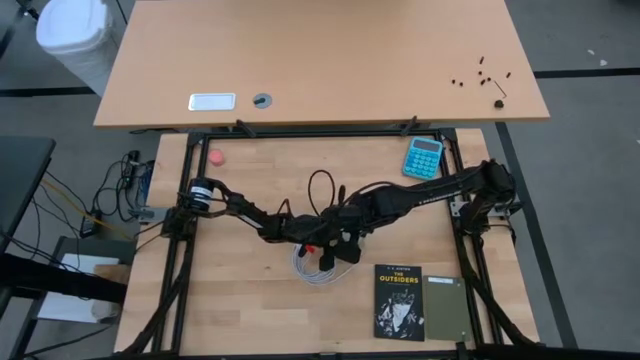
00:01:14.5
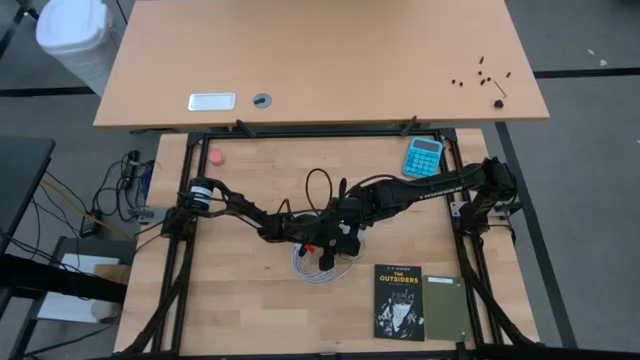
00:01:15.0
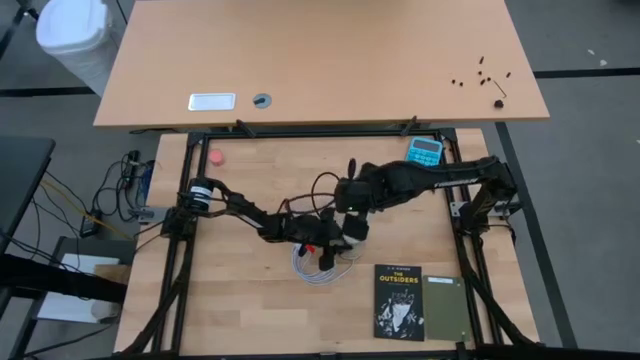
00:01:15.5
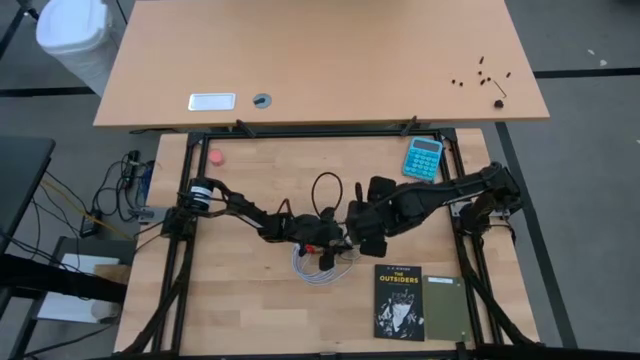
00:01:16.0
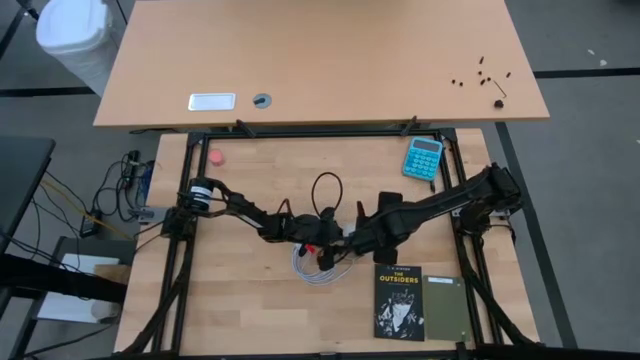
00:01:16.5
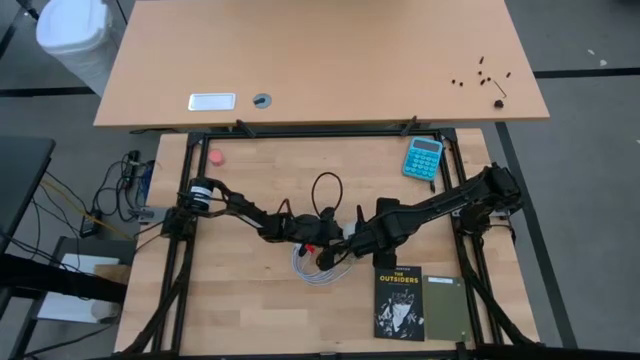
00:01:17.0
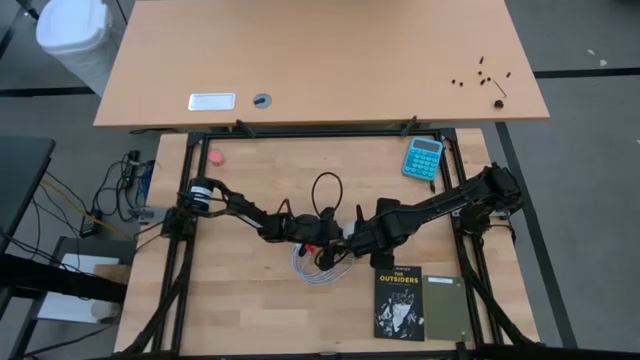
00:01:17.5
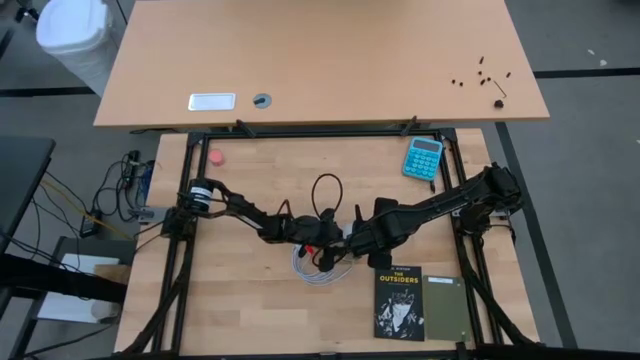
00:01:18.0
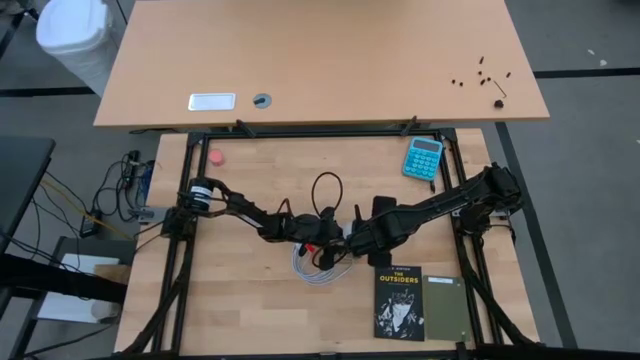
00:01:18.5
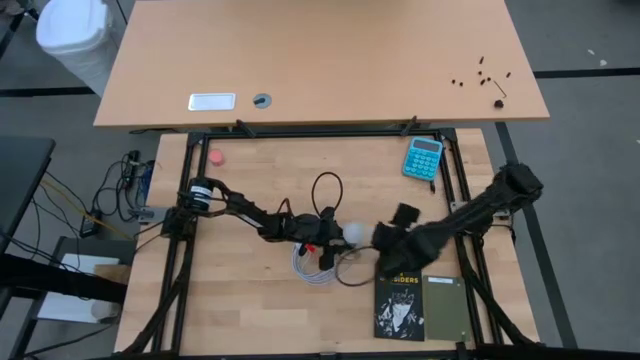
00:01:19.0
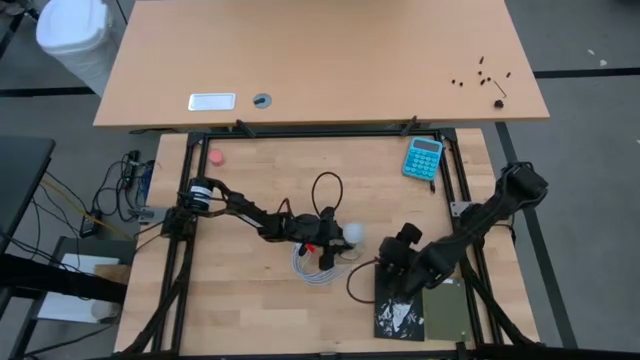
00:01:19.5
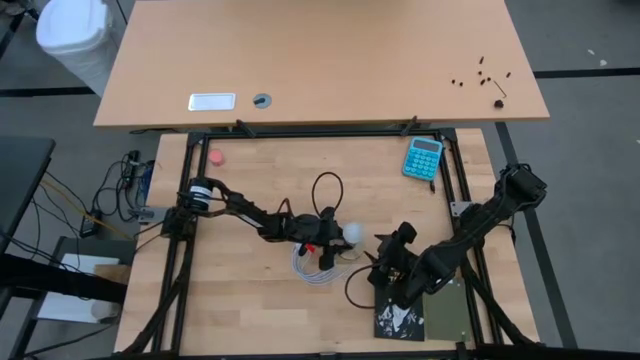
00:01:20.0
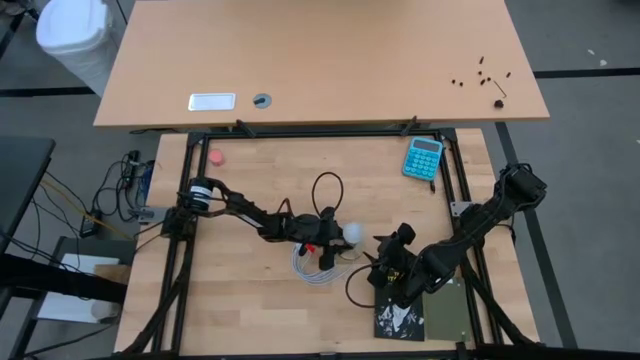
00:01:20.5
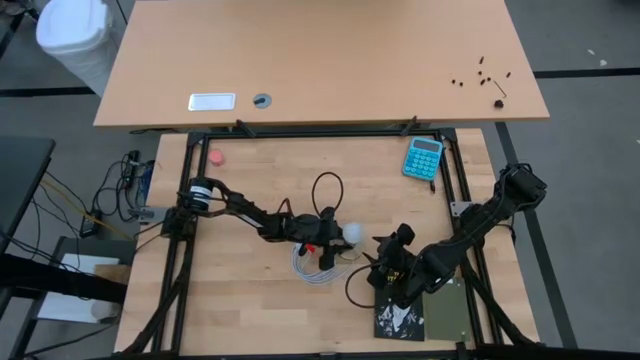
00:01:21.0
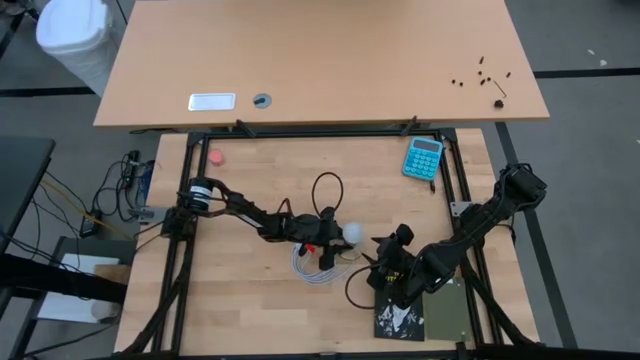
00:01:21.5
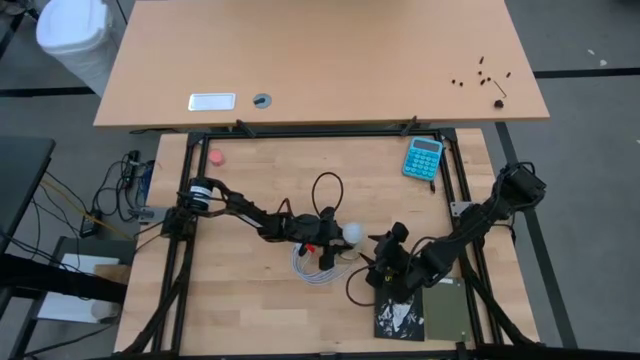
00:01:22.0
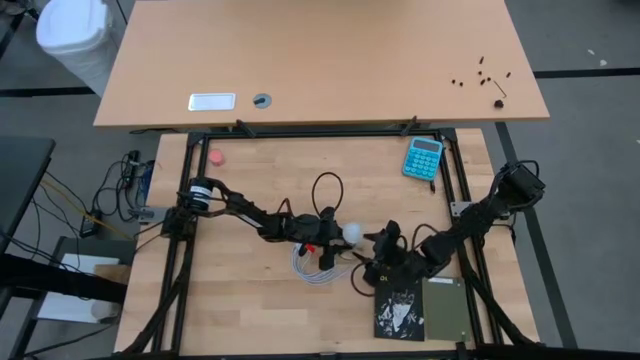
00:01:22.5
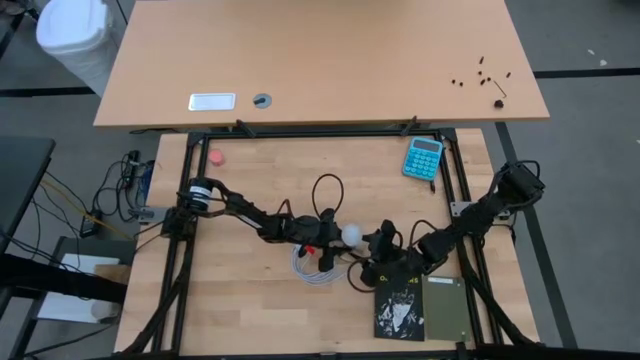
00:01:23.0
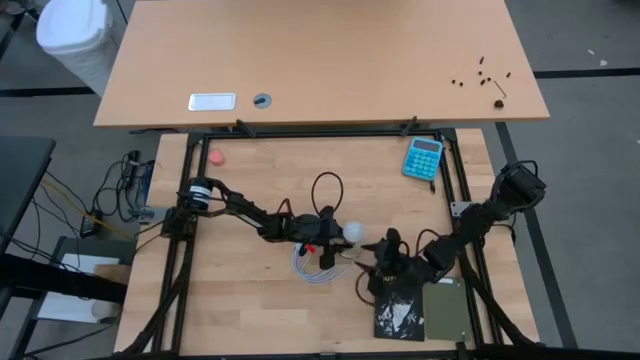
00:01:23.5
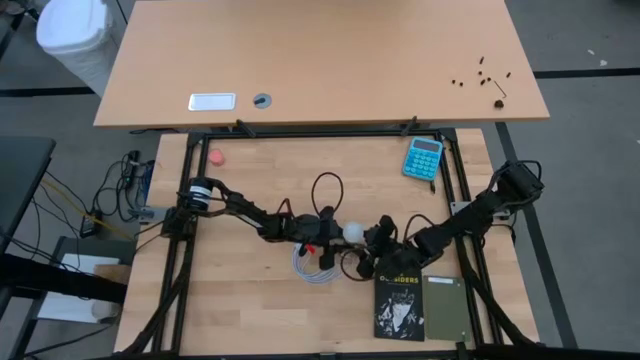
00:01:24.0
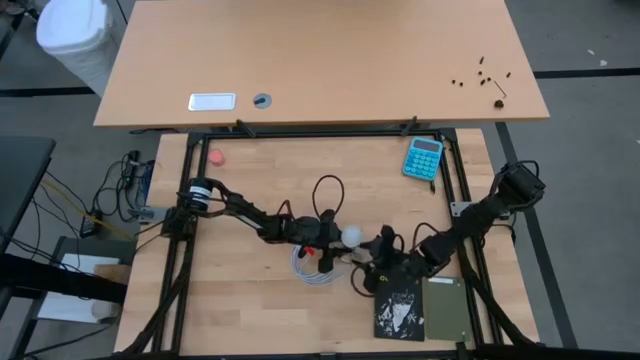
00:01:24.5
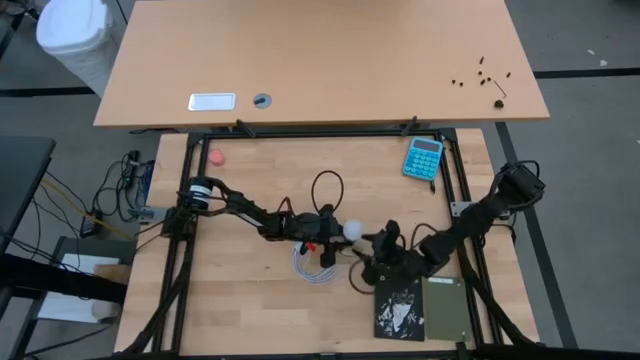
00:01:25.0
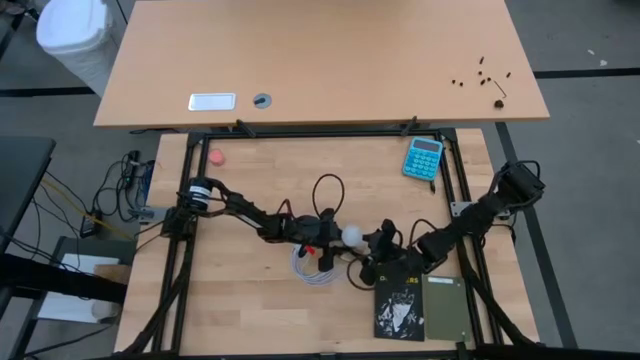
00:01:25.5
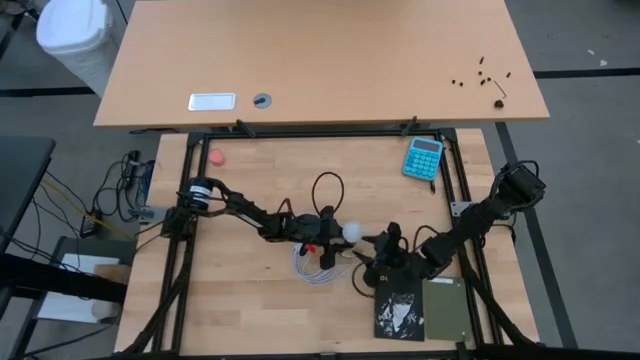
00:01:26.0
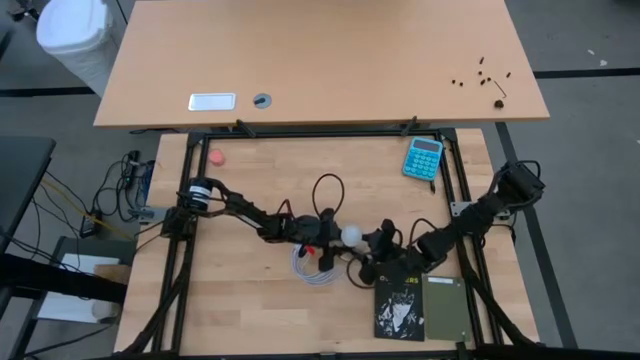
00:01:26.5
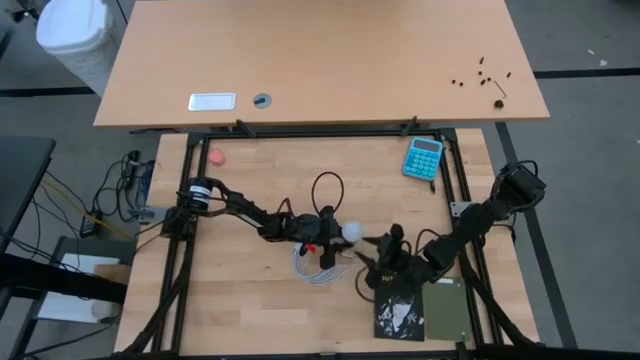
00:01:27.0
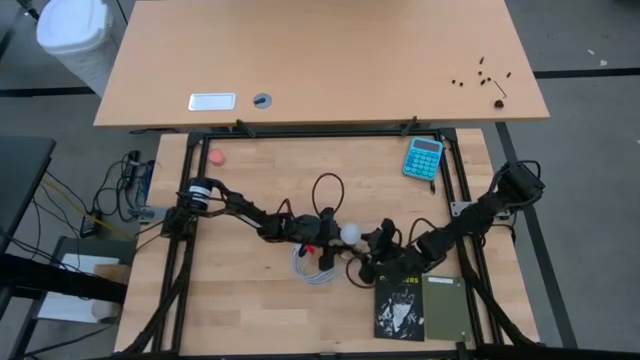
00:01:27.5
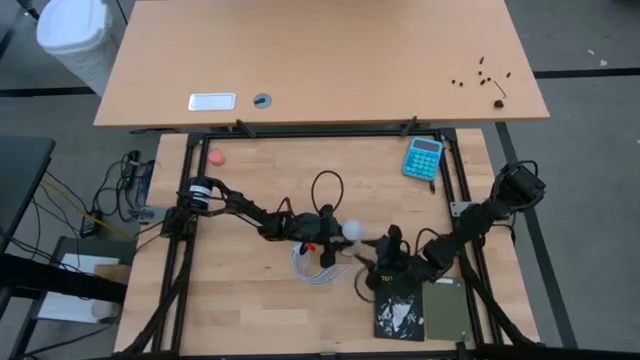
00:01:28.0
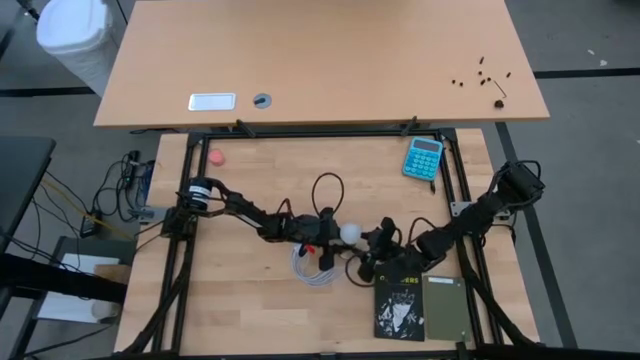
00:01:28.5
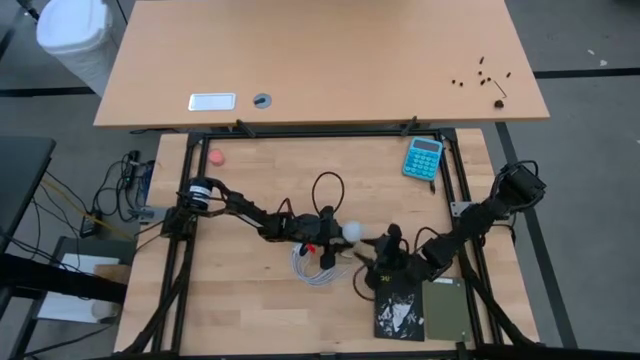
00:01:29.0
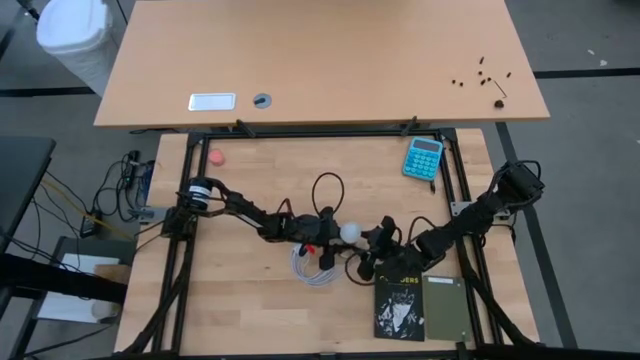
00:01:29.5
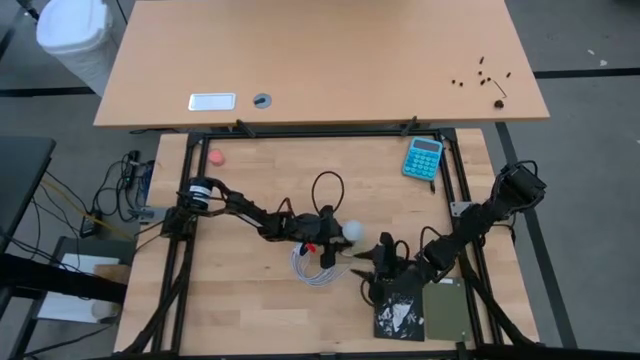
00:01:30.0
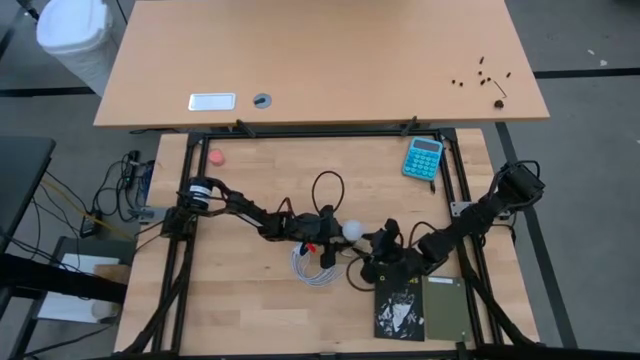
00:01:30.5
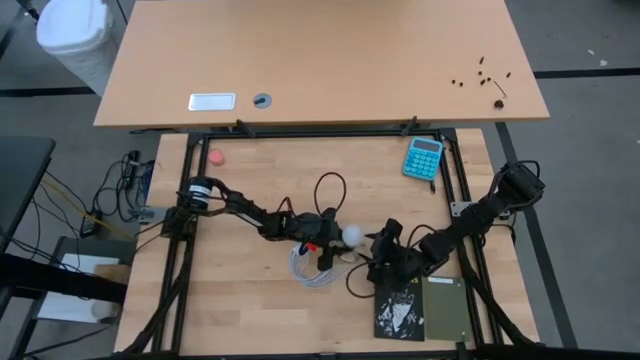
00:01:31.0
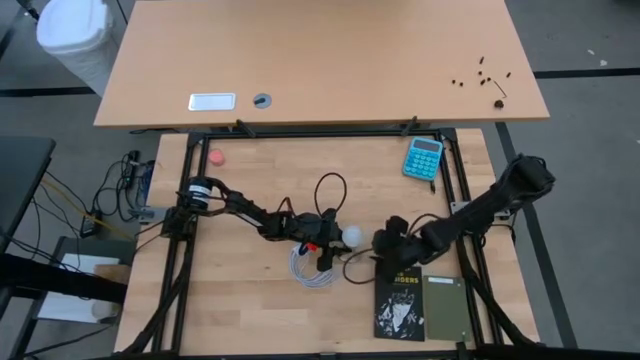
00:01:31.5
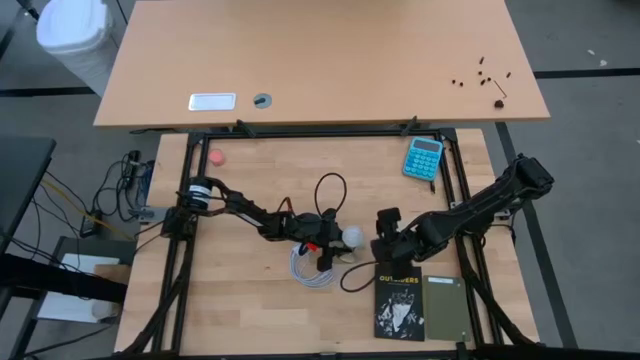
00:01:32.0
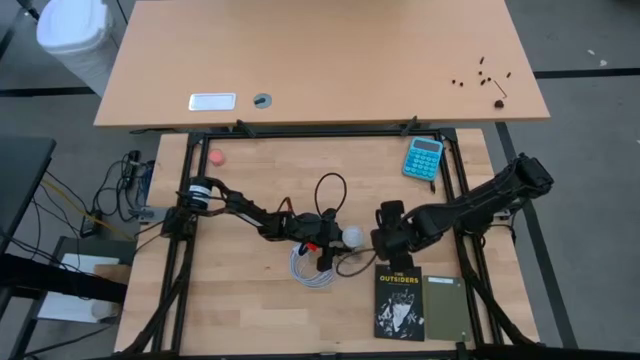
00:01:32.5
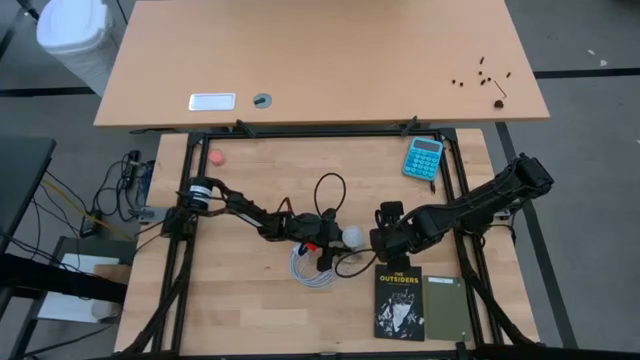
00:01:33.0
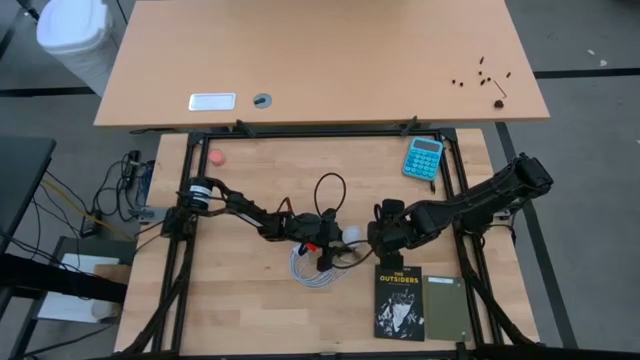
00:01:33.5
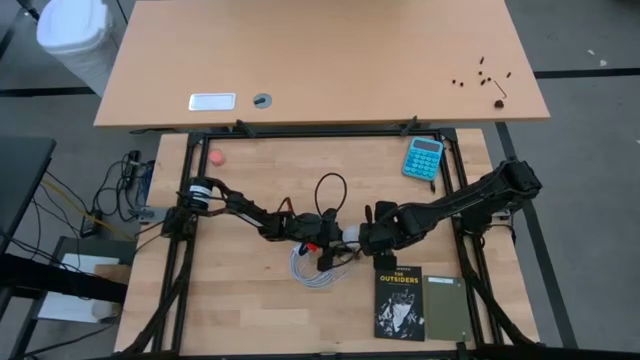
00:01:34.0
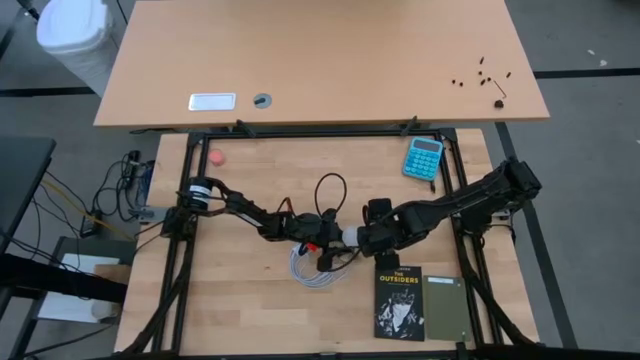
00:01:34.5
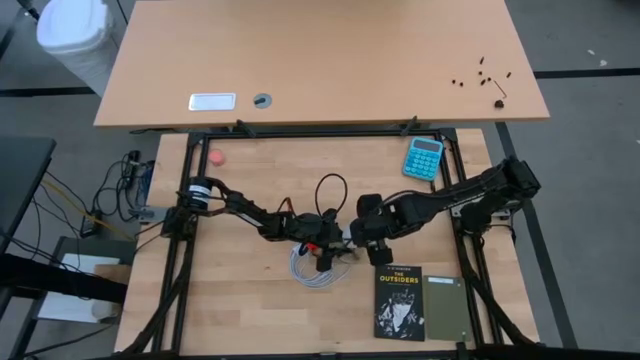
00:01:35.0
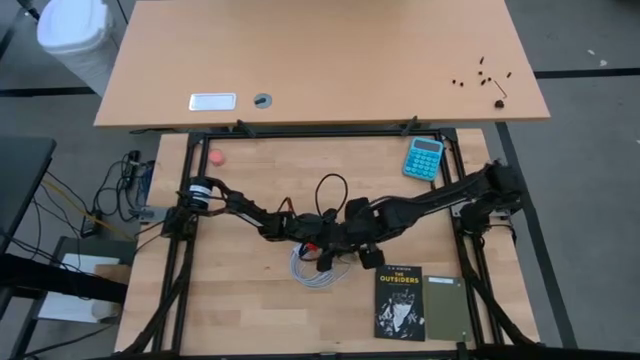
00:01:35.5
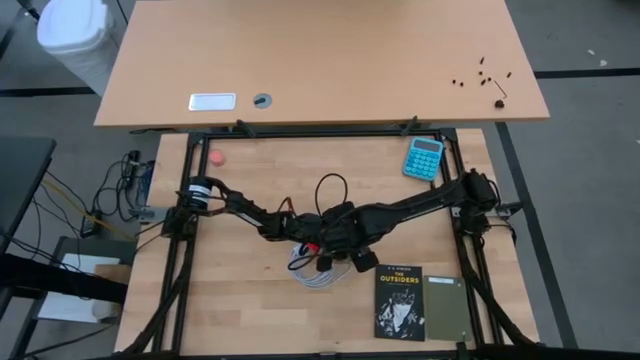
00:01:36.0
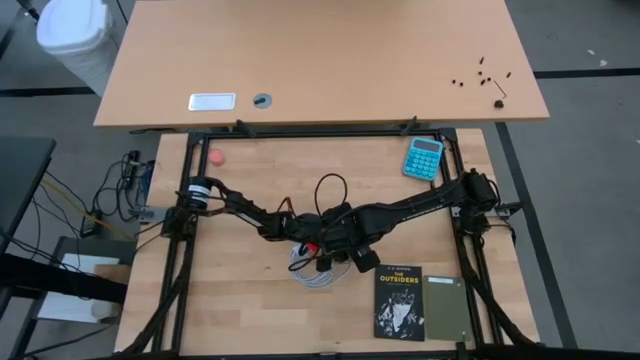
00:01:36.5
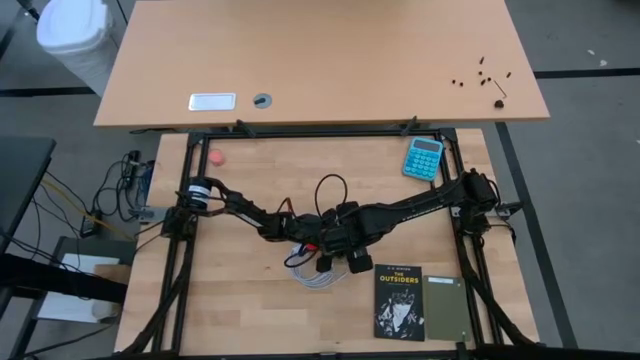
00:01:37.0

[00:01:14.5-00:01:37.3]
Task: Screw lightbulb
Insert the white lightbulb into the silver lamp
